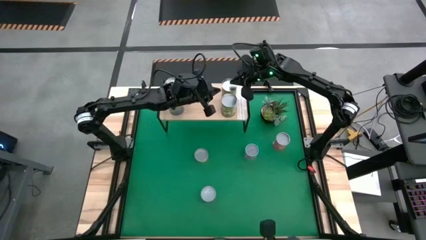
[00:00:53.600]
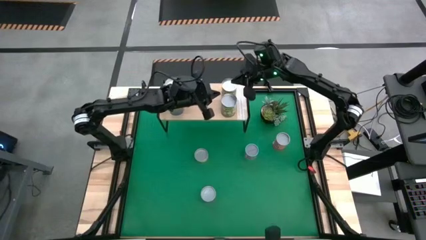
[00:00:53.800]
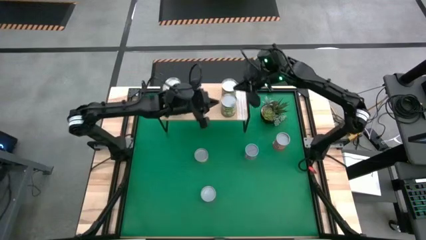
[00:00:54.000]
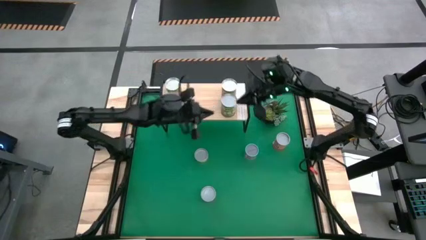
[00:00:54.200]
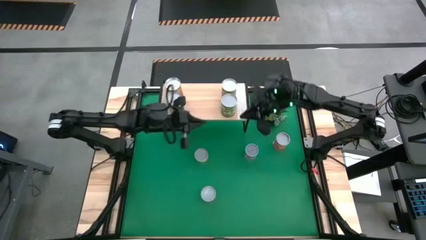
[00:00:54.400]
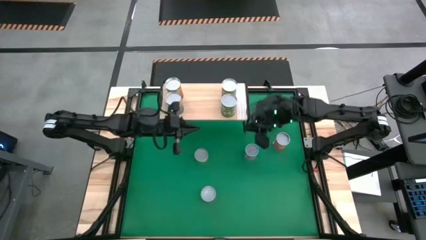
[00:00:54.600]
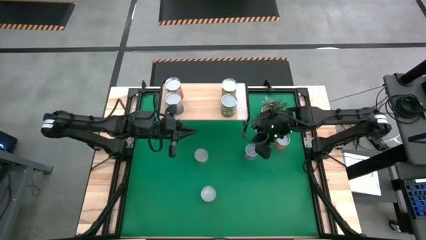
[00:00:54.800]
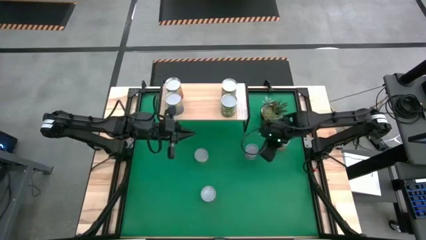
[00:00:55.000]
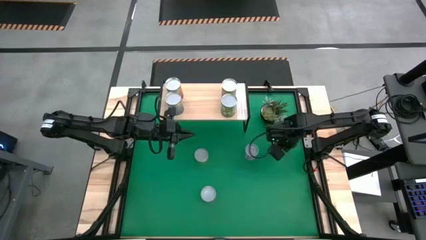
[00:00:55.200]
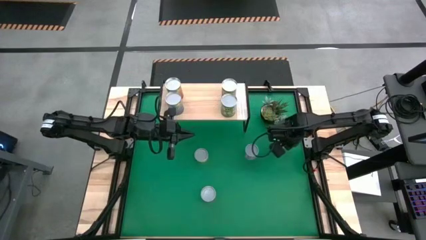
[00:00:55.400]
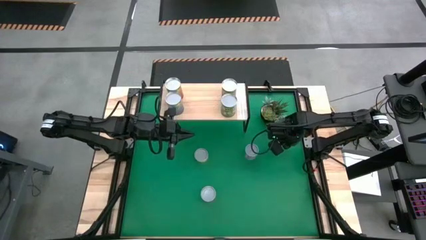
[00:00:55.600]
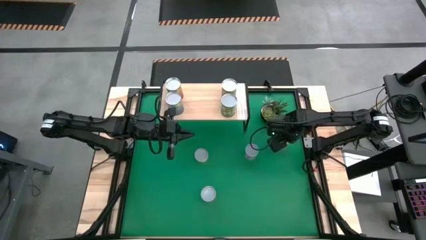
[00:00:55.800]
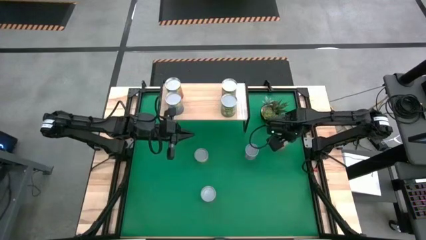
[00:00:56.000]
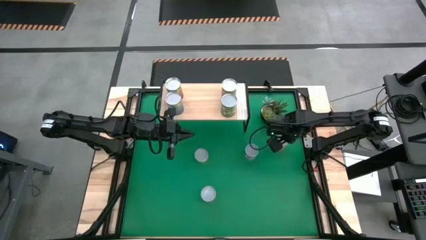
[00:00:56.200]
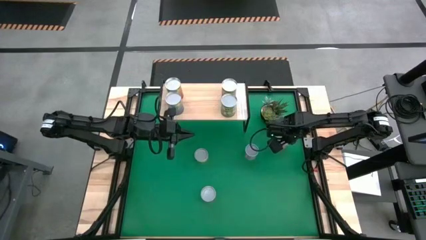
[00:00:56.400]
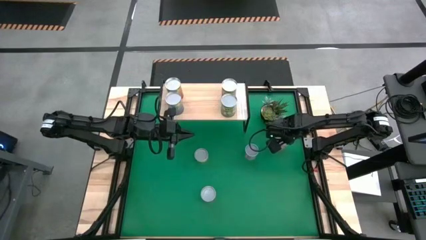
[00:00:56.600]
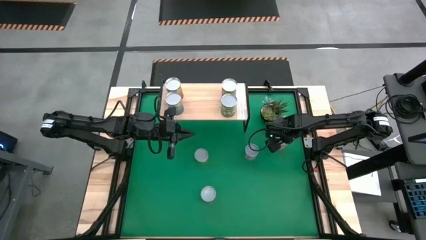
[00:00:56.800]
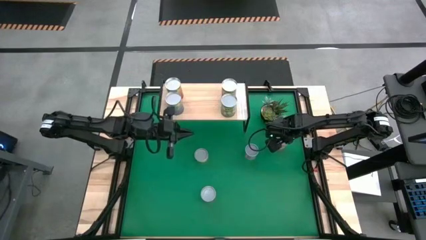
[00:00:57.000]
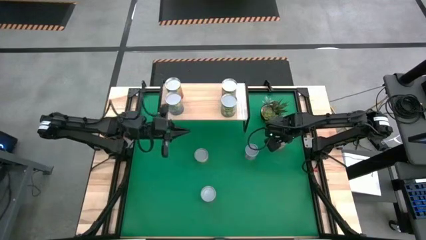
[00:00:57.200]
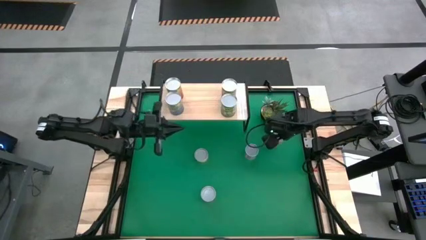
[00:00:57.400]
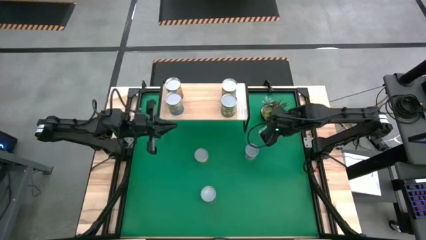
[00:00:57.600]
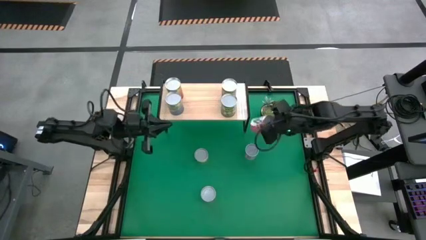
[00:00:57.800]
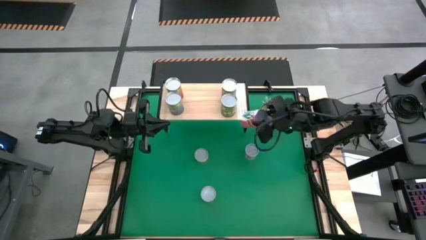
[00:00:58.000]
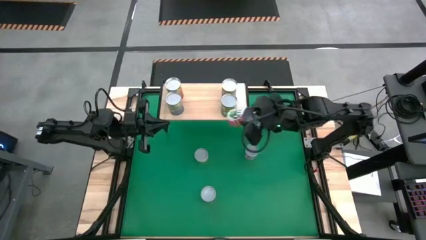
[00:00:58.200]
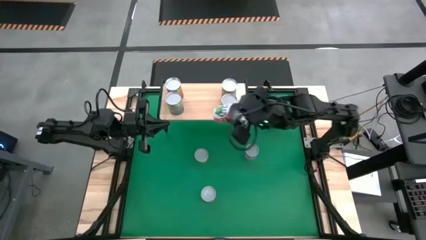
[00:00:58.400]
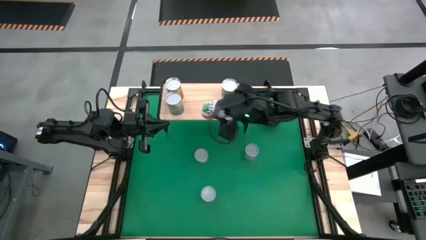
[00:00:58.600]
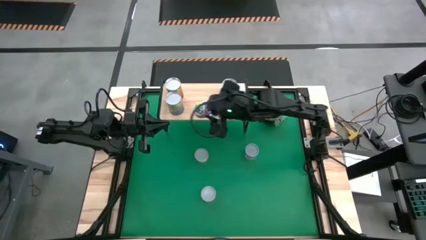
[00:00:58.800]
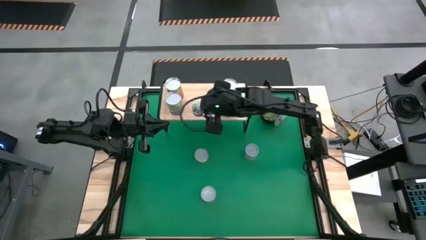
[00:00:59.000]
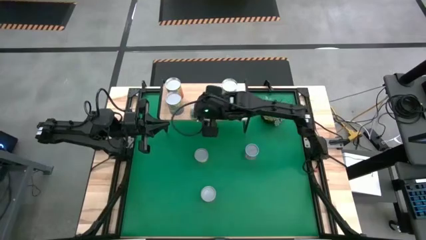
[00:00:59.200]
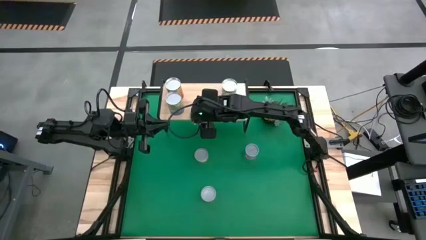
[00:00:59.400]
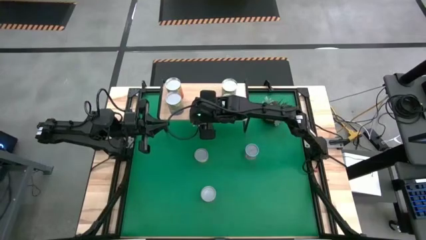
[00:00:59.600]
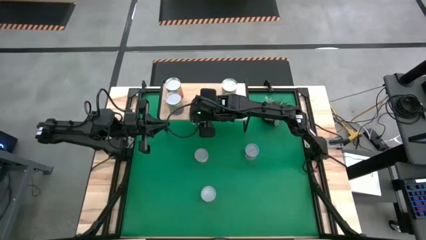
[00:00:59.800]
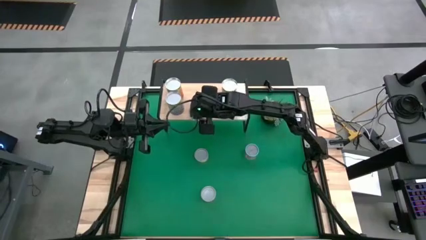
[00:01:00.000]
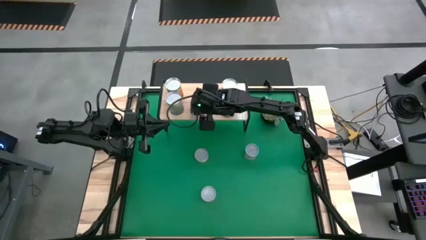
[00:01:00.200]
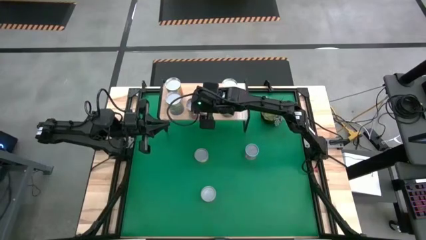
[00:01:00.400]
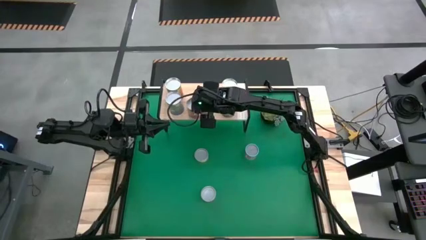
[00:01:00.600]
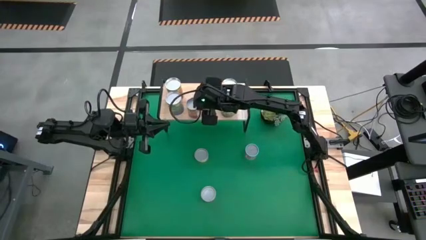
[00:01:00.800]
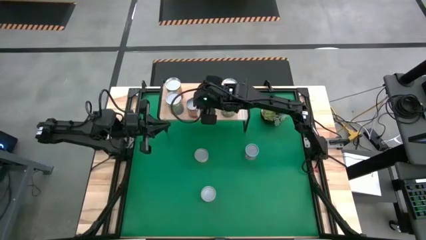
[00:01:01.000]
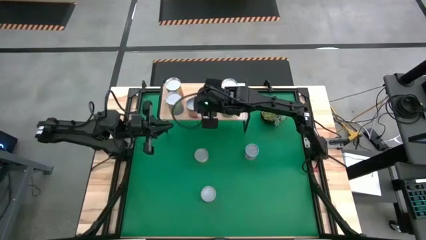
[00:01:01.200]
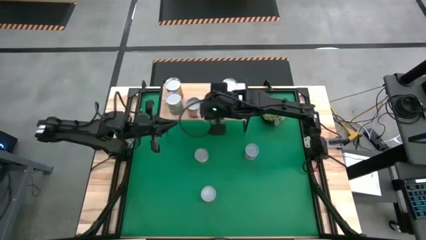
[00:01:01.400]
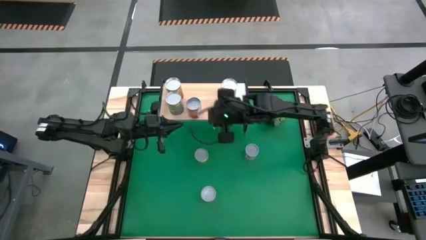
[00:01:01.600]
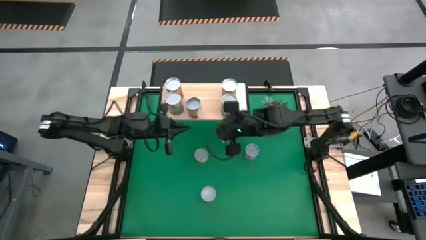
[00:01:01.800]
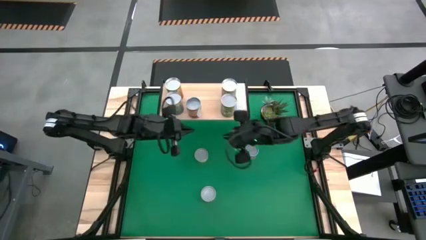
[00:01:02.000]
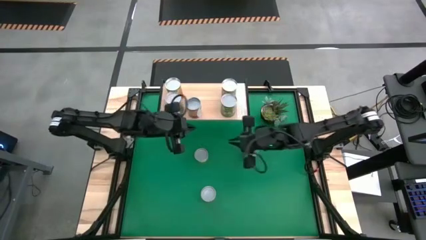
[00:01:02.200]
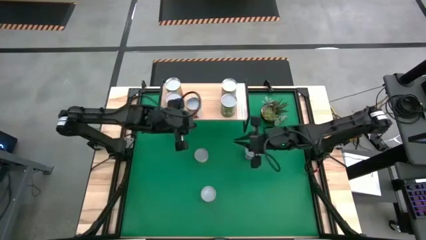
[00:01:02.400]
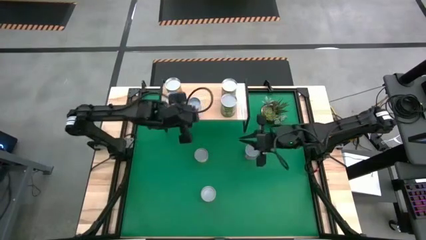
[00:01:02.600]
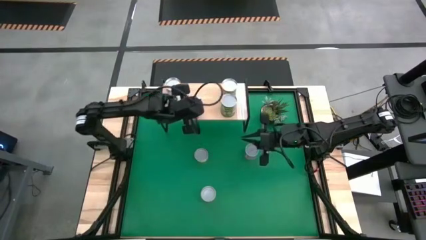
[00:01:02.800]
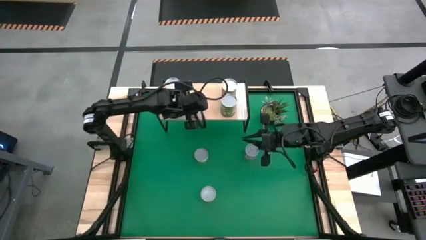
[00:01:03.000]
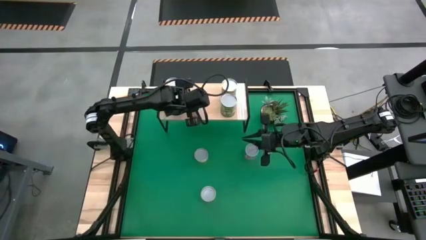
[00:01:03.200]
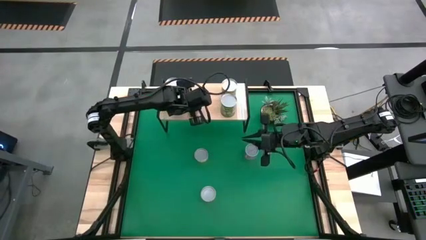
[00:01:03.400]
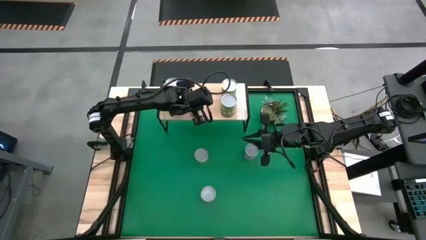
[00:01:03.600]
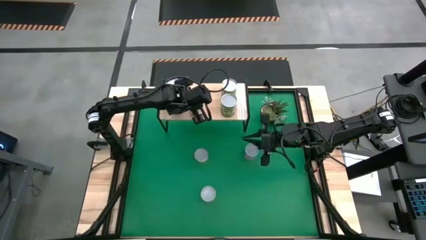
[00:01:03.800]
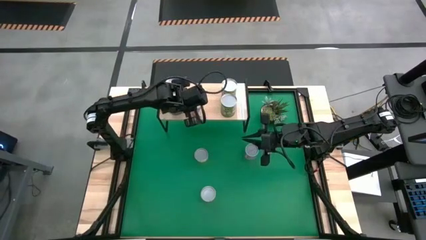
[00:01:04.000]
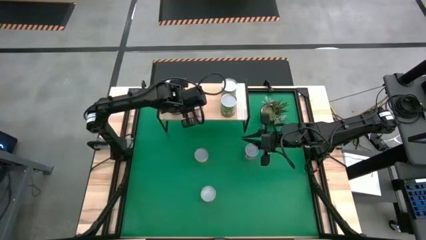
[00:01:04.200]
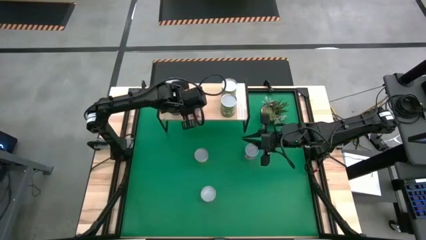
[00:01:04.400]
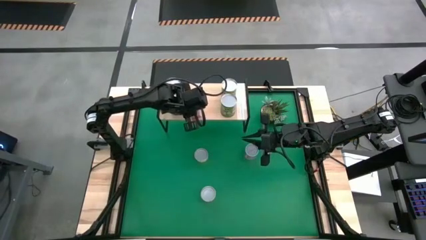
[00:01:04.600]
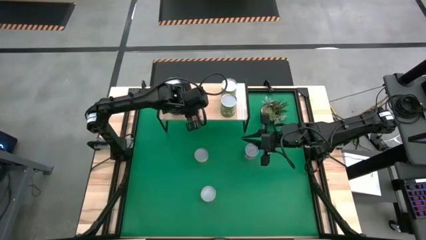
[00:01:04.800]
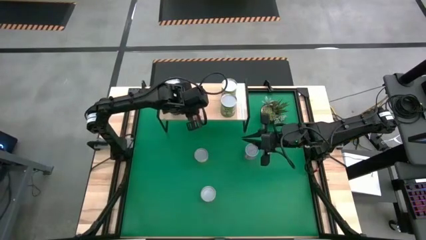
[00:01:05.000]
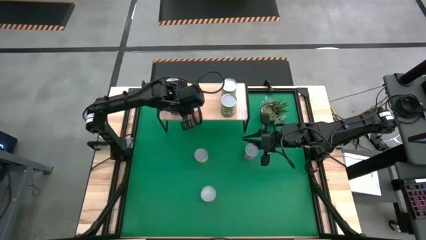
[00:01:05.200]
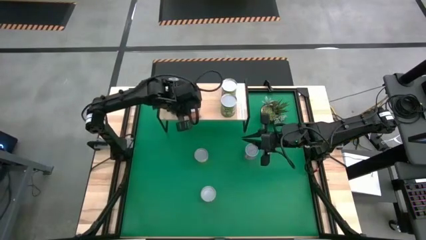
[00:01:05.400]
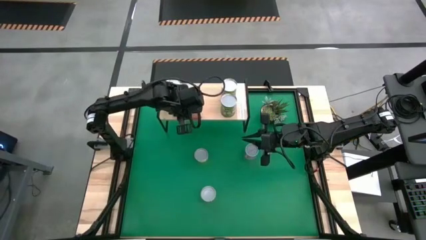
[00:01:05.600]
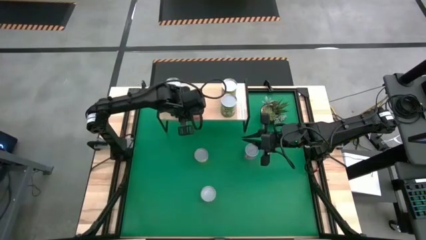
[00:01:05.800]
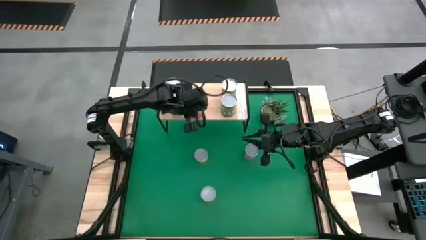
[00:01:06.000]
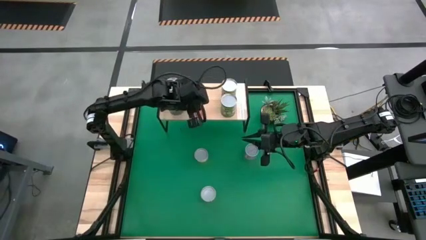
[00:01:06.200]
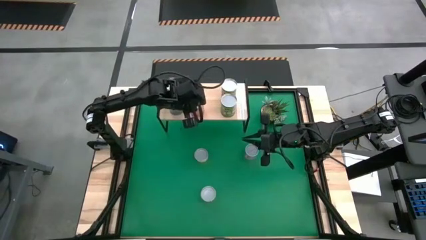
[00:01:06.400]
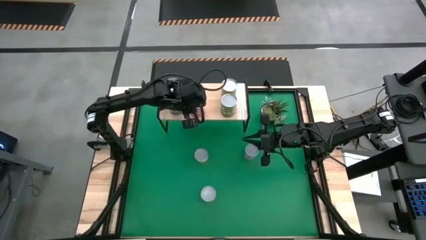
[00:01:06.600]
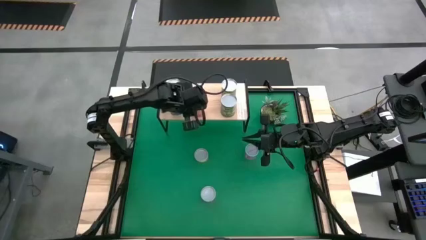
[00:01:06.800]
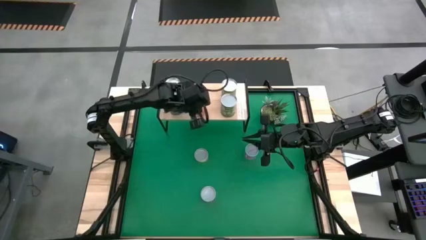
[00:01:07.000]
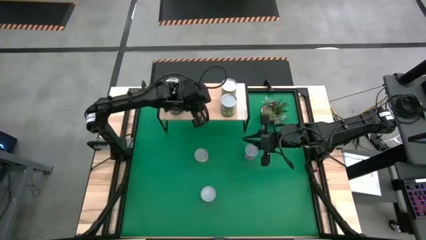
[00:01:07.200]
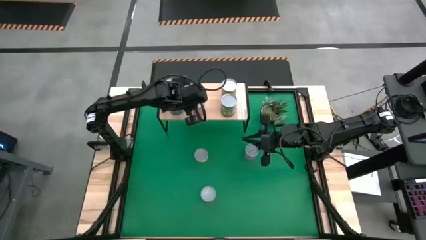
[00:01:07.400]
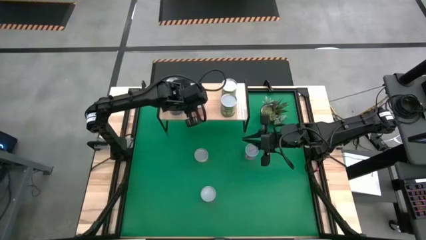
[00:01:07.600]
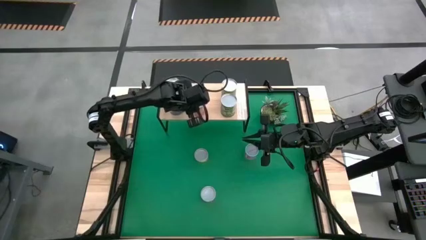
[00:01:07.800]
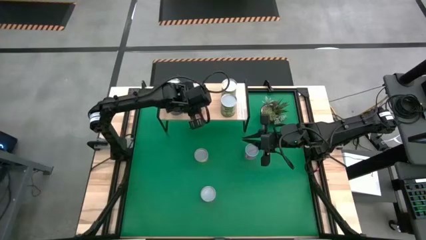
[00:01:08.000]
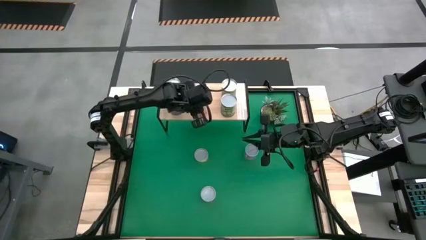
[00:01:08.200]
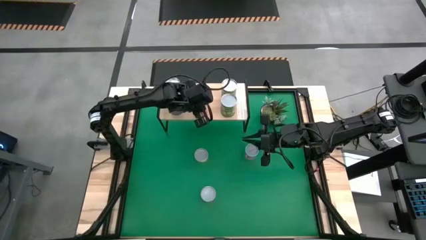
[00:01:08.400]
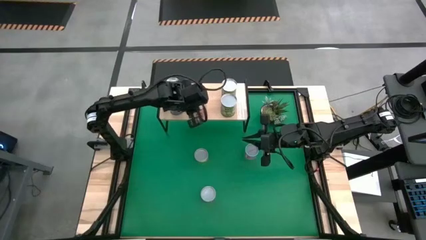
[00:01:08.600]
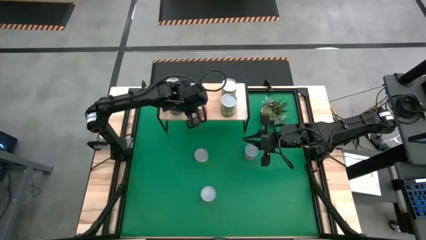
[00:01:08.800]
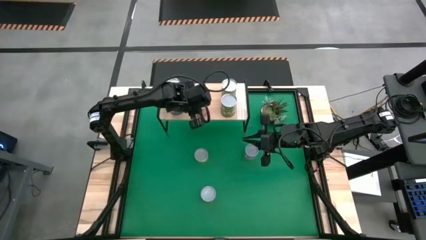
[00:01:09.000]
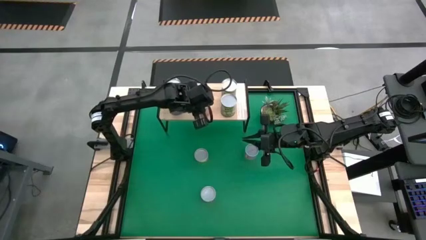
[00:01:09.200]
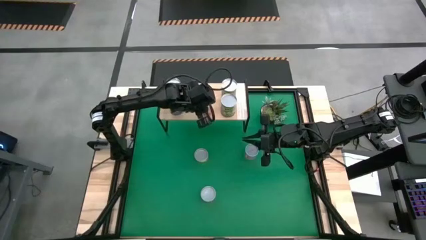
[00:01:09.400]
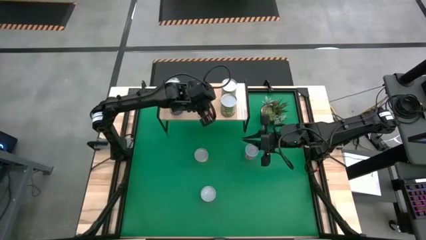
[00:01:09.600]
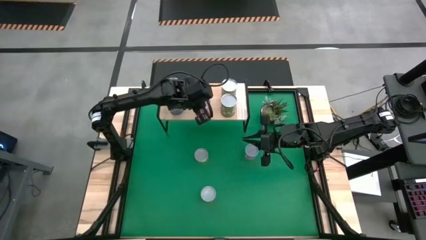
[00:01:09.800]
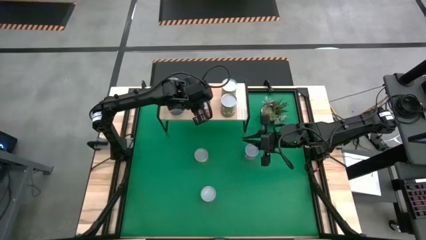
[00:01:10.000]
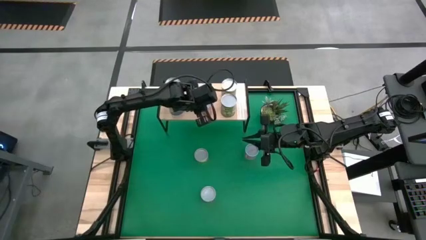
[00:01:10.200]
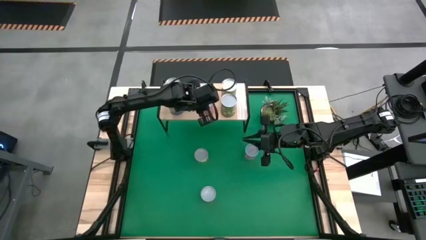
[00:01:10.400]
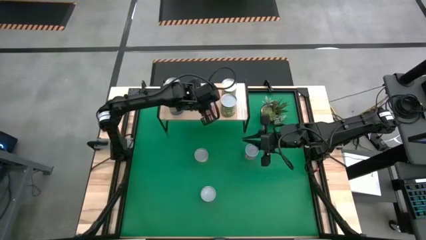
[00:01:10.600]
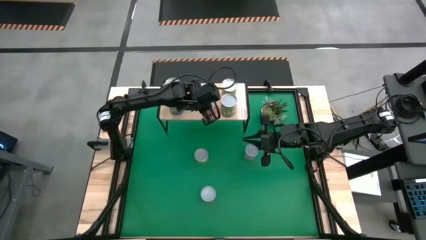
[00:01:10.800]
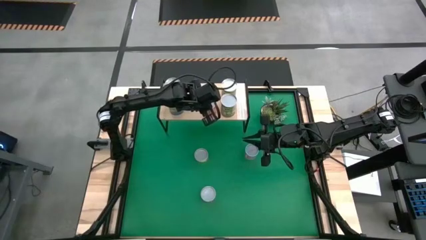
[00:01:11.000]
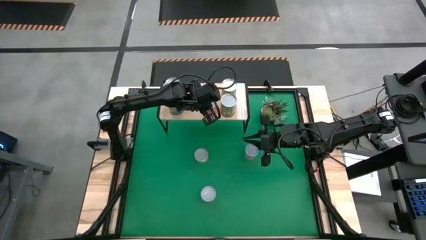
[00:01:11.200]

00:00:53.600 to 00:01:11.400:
Task: Pick and place cans onto a shelf
Put the small white can on the shelf
